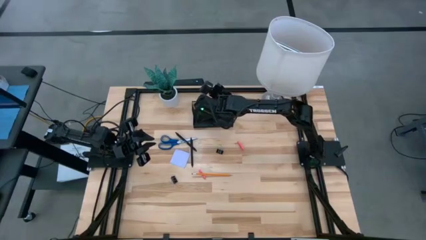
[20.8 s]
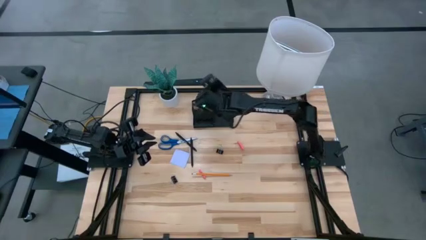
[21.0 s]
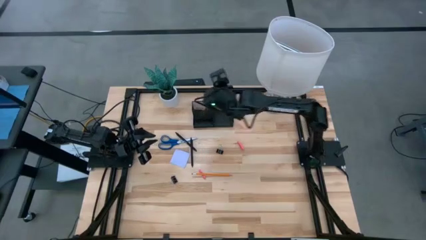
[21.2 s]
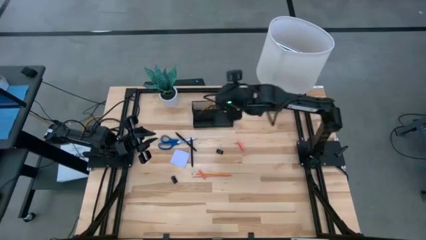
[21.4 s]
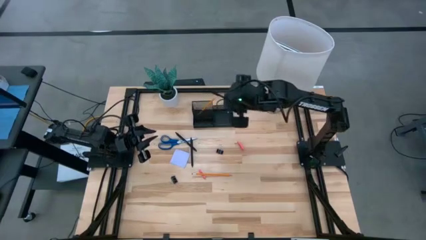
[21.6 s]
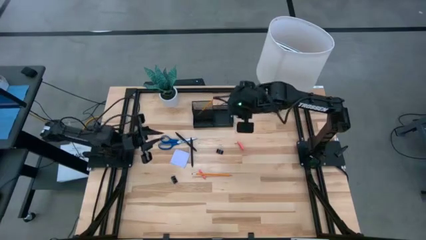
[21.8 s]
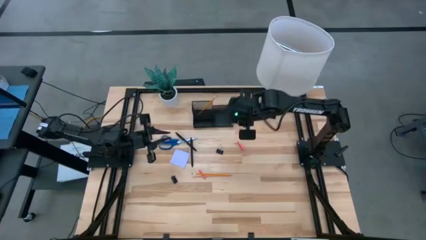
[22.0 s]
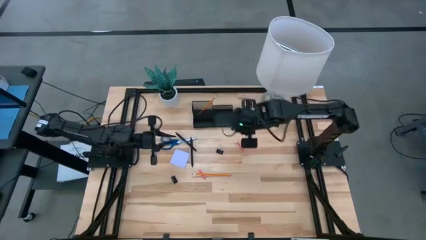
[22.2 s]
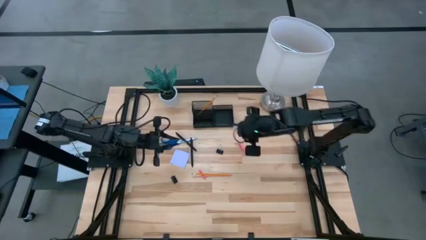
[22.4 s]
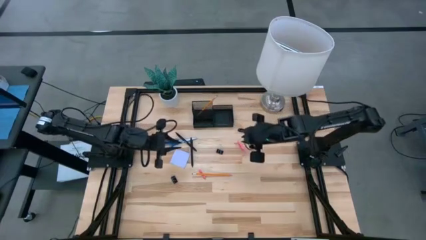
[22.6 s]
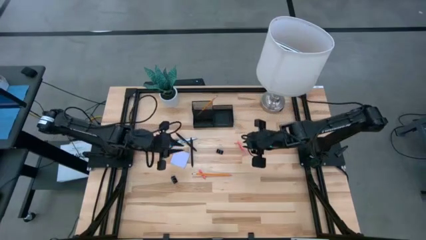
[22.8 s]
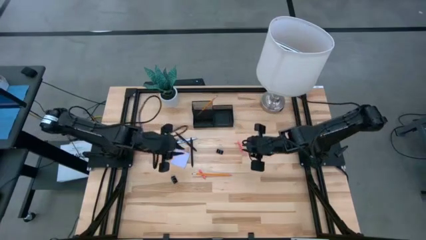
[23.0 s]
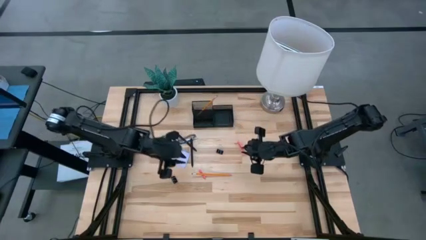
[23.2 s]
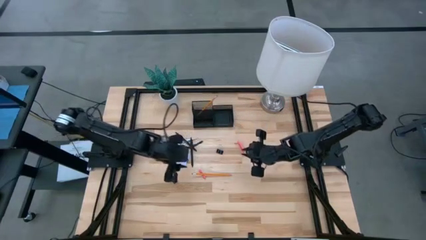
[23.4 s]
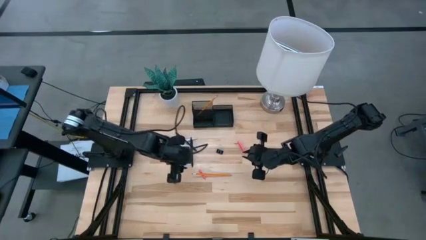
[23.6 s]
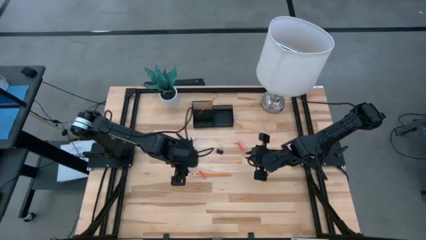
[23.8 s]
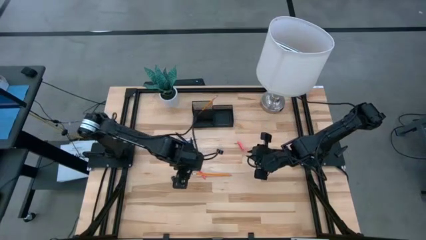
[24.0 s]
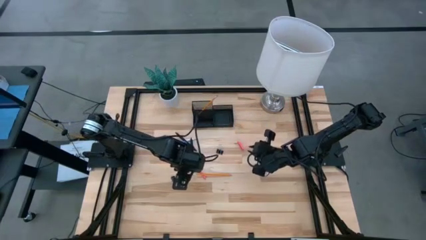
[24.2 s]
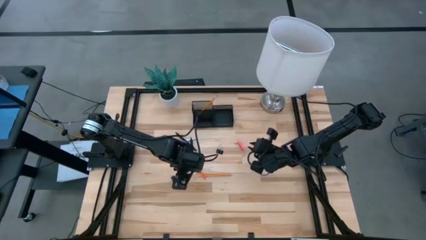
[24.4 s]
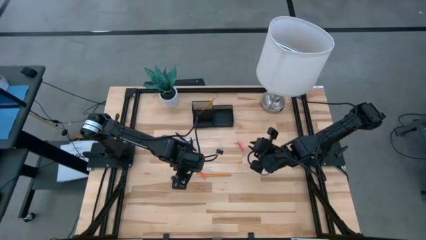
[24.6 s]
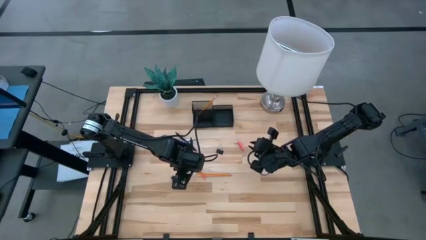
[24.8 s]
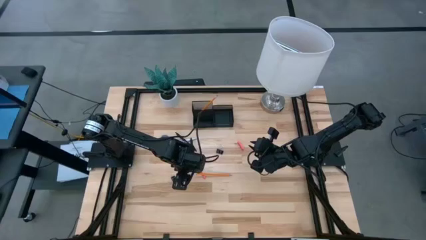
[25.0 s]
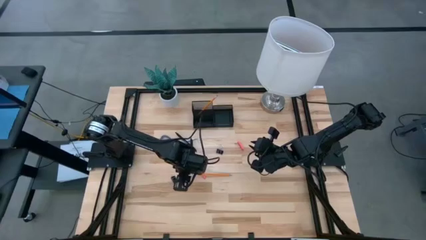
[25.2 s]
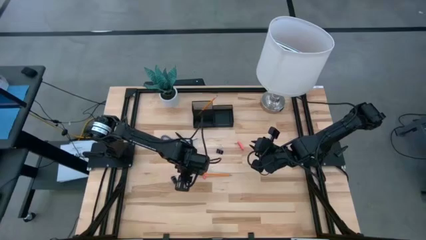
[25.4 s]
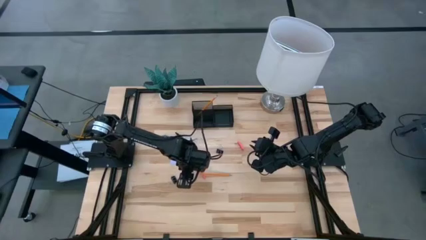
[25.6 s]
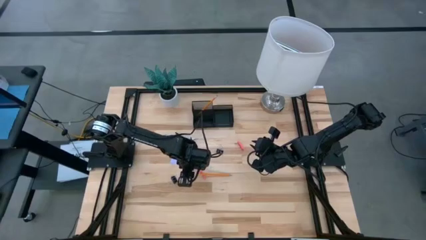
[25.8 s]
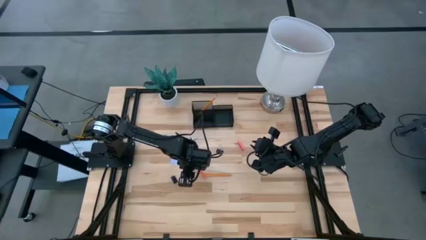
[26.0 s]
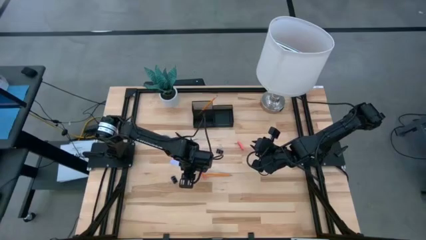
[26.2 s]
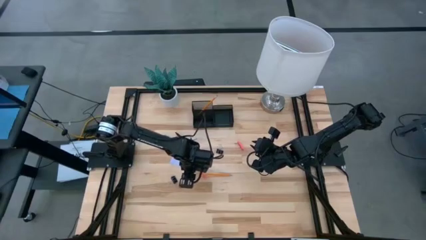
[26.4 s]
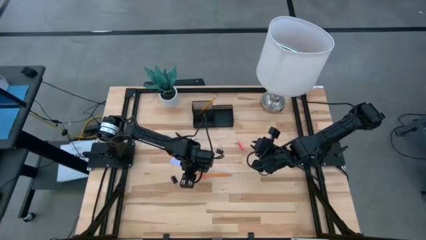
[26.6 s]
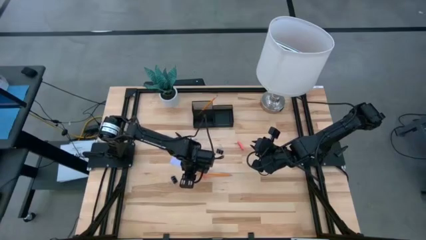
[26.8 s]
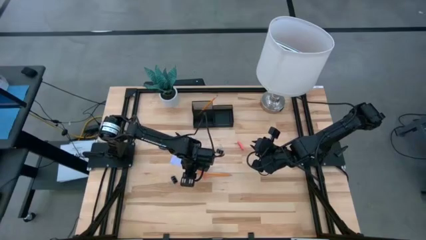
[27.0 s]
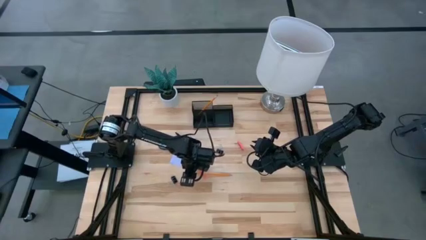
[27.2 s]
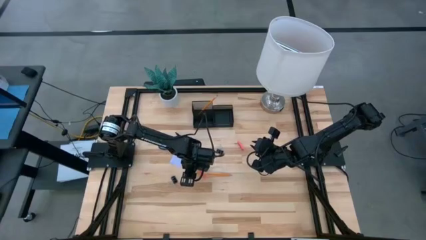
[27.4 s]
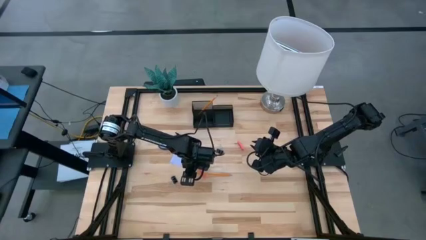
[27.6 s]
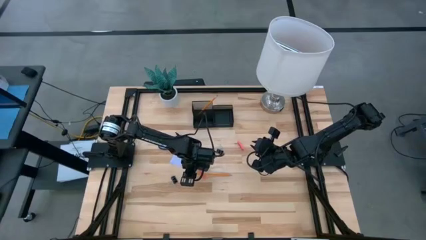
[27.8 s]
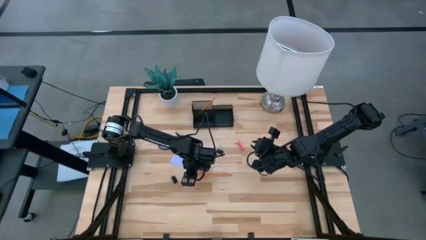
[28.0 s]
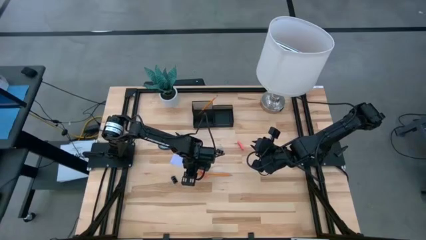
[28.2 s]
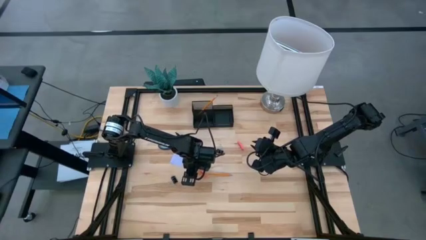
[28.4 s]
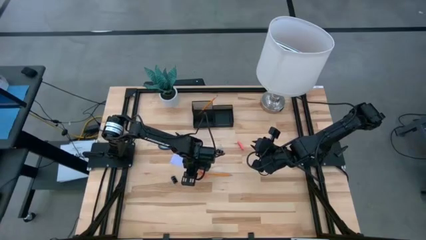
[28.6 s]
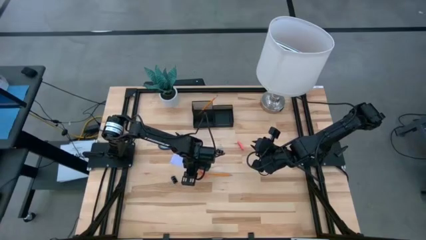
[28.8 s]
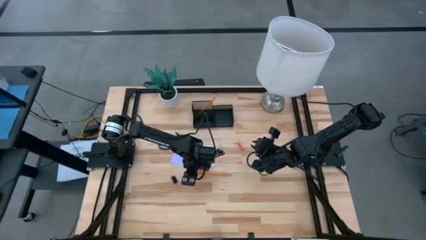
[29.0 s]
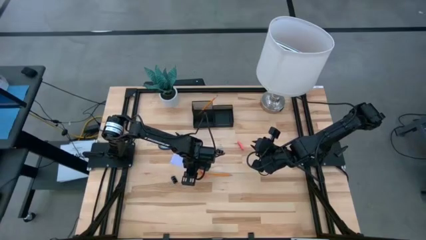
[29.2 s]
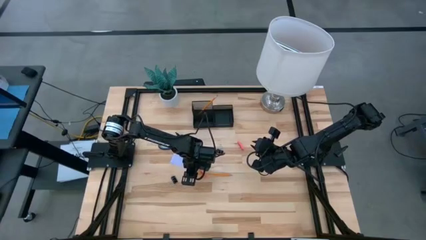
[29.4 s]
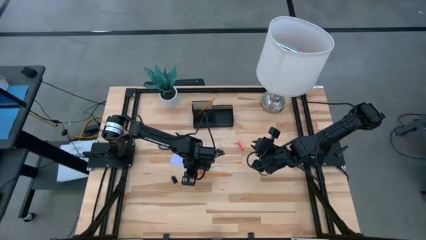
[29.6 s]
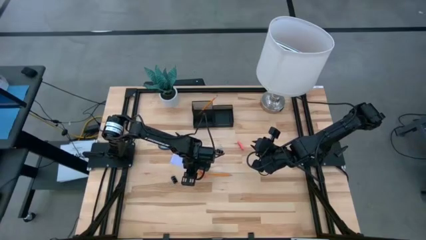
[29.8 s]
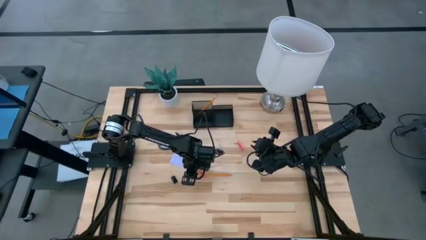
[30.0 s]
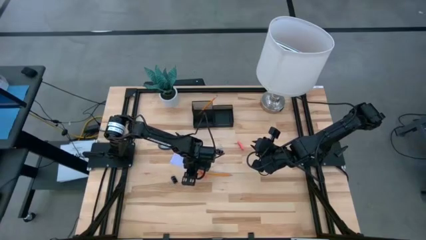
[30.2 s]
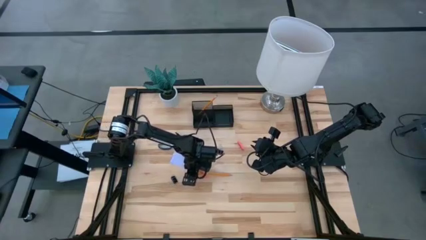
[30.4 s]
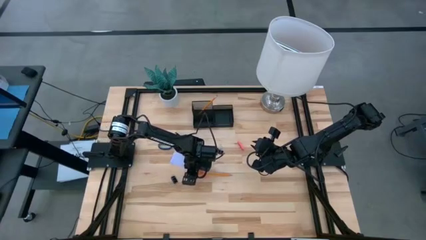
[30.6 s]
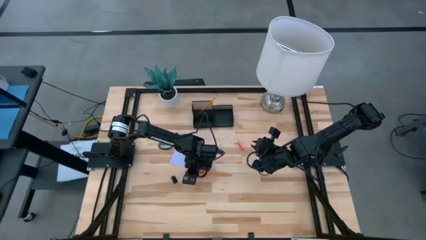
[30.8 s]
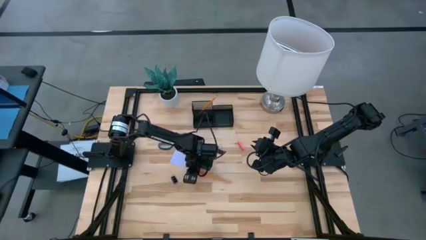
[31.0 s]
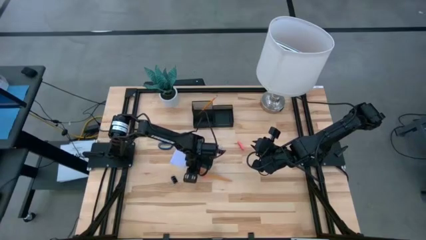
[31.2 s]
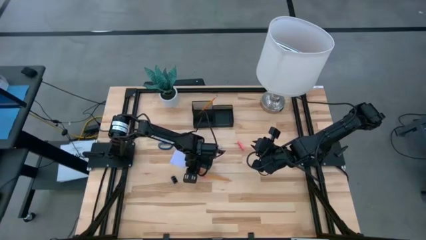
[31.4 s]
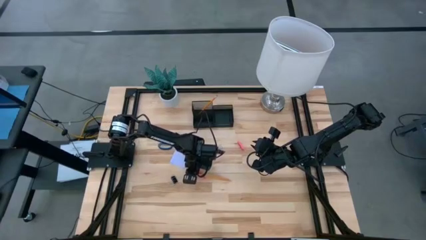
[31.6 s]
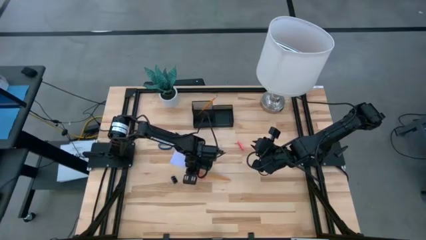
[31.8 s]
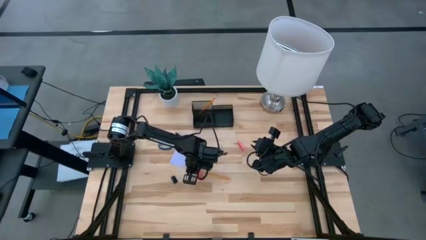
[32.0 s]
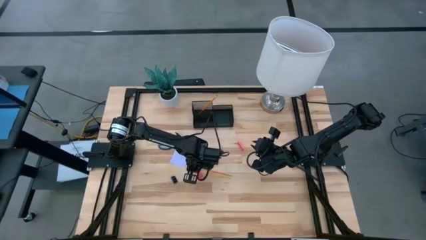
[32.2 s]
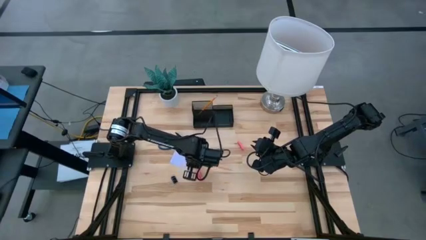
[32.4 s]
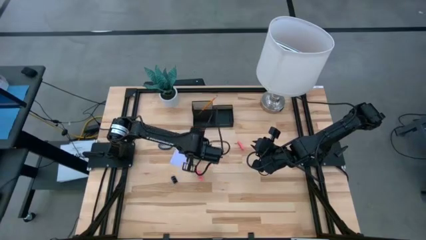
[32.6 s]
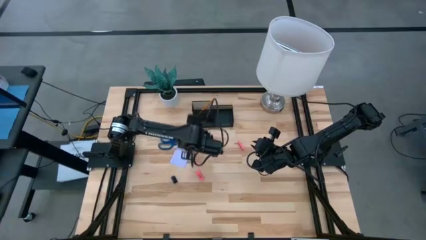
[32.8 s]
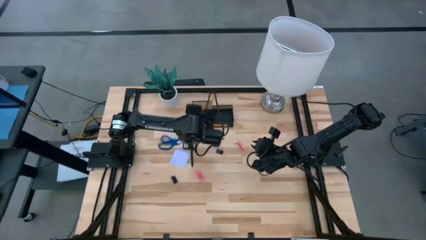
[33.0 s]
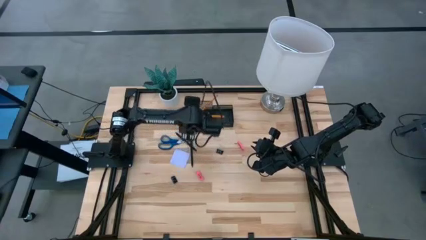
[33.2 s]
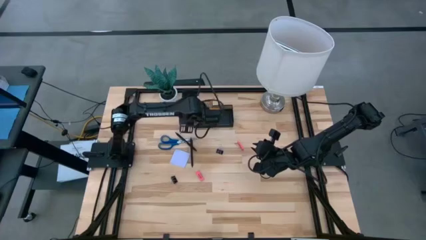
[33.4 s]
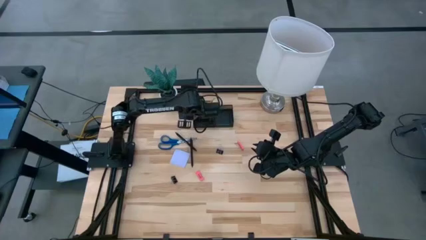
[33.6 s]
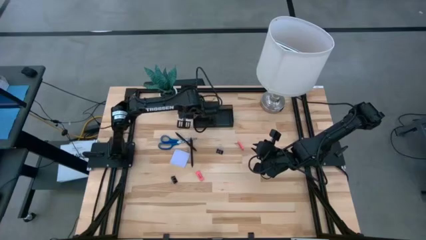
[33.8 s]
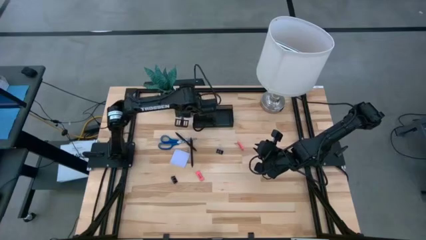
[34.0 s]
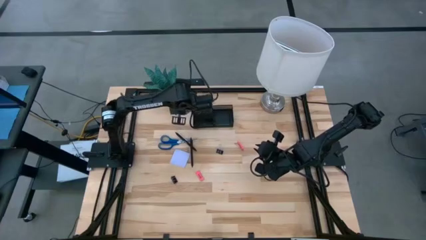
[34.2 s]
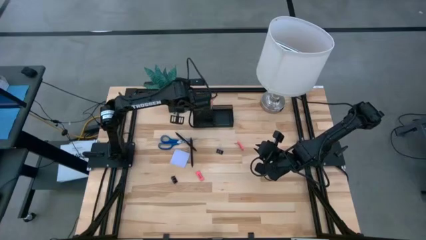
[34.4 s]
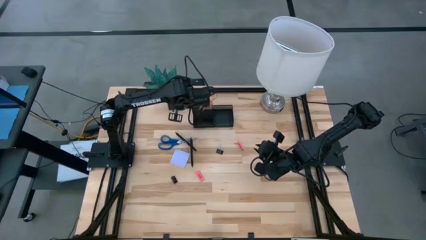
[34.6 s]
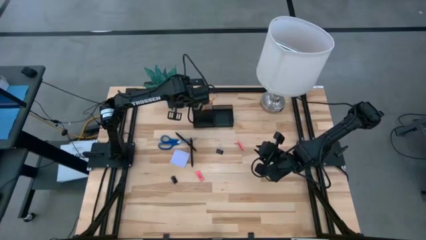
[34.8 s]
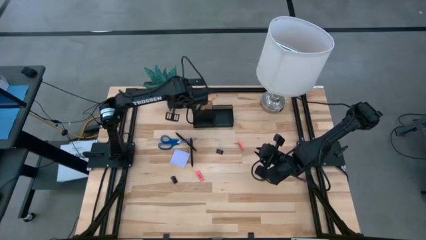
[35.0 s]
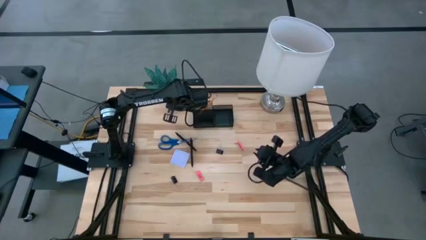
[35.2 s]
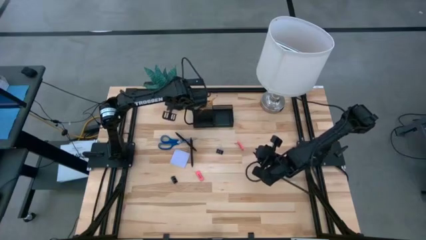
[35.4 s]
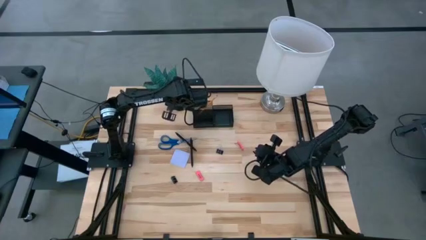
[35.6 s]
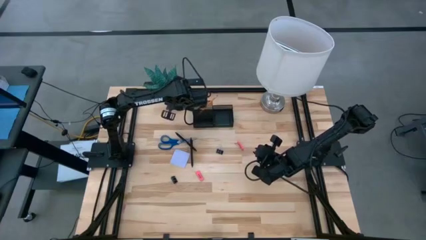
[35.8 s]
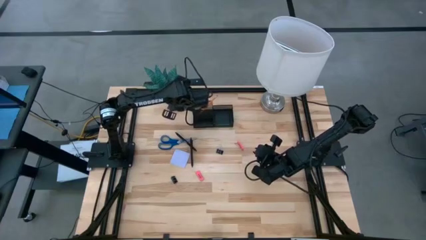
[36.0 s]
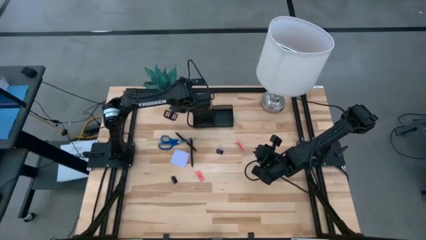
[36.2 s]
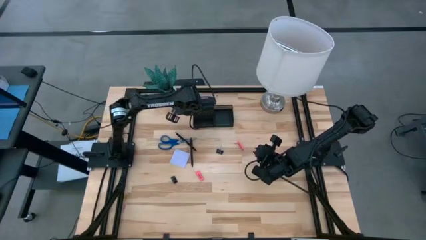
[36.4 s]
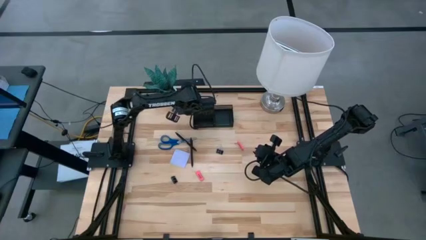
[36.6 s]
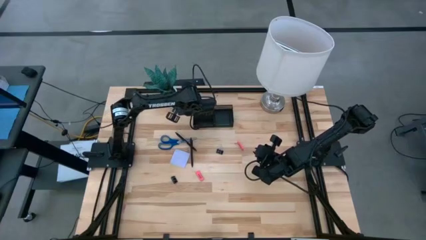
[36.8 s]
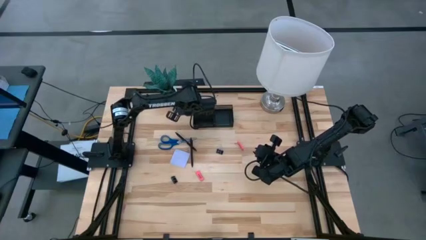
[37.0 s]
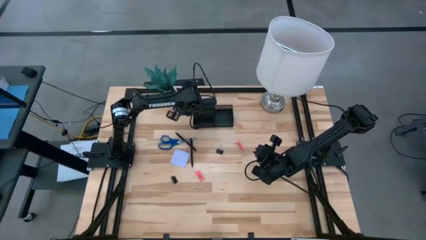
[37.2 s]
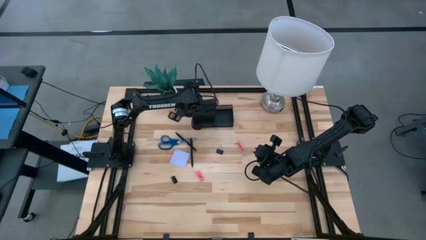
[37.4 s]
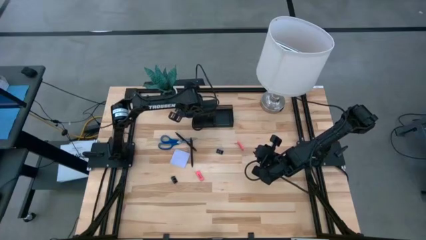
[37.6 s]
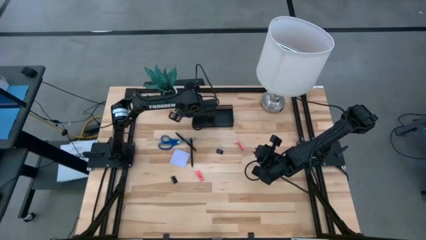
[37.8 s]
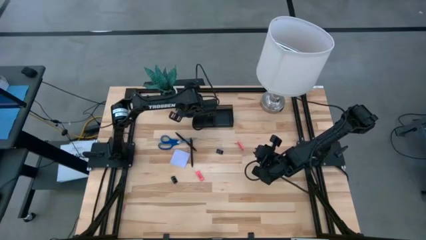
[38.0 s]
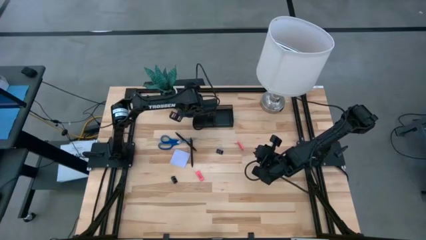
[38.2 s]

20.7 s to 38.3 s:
Task: Pick and place office supplies into organizer
Put the yellow pencil into the desk organizer
